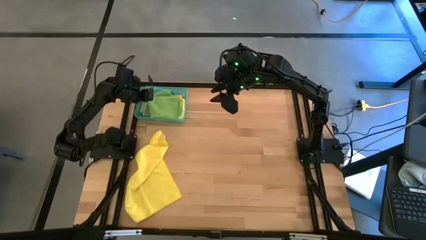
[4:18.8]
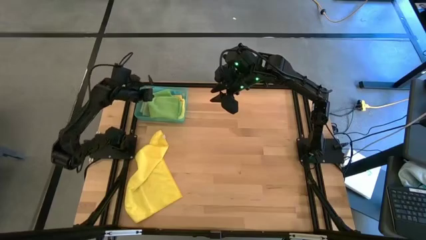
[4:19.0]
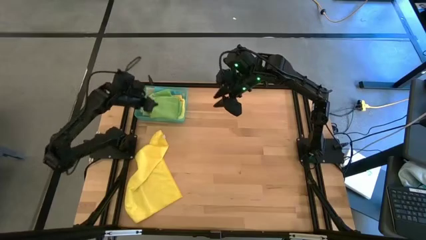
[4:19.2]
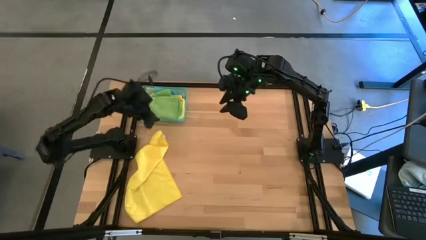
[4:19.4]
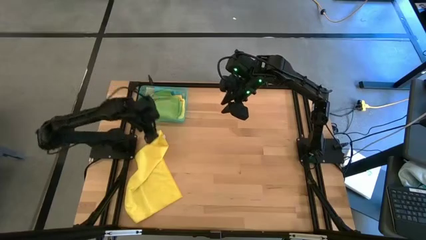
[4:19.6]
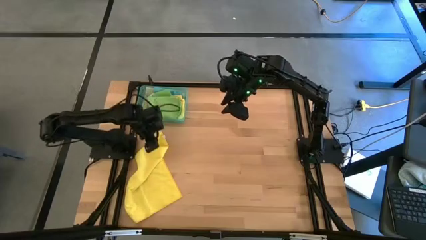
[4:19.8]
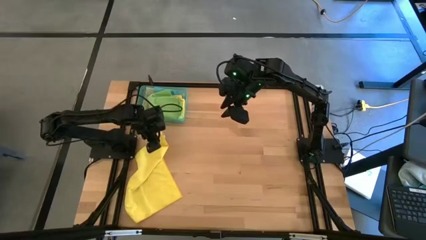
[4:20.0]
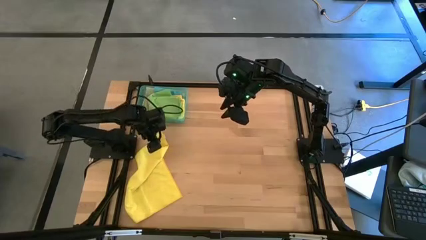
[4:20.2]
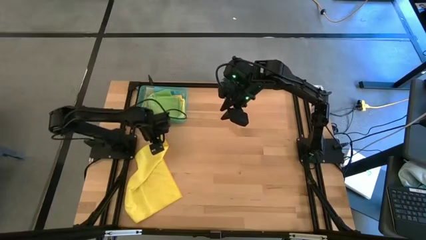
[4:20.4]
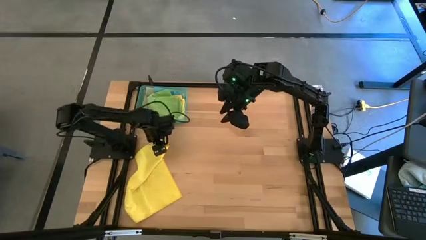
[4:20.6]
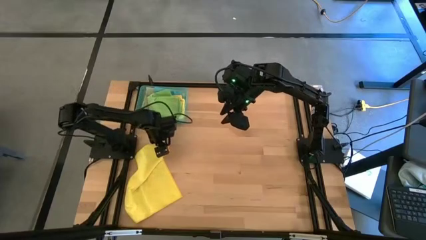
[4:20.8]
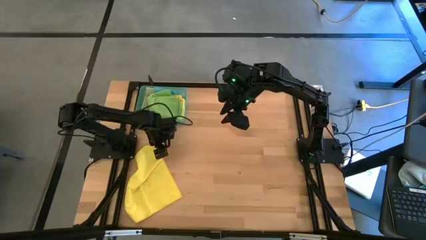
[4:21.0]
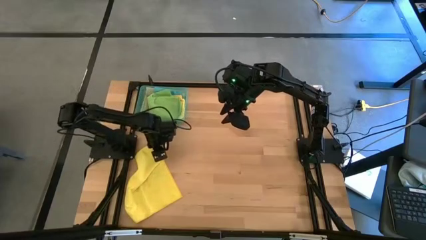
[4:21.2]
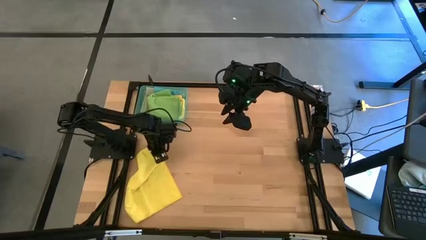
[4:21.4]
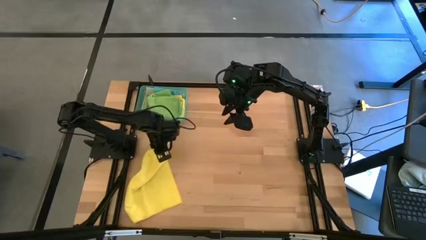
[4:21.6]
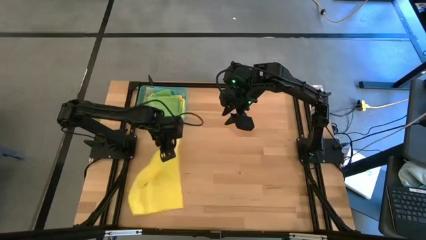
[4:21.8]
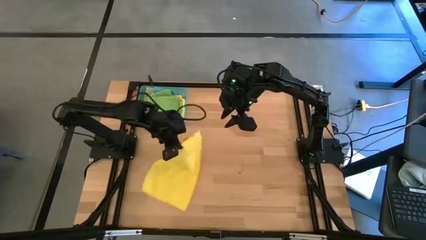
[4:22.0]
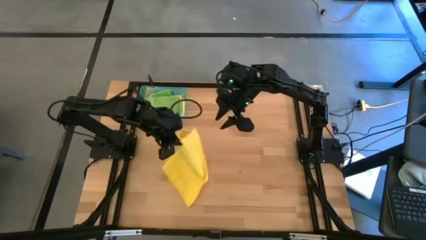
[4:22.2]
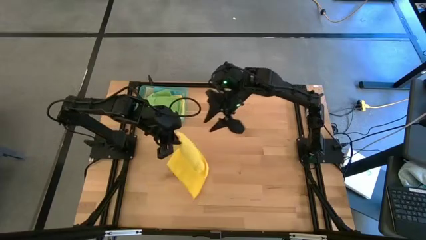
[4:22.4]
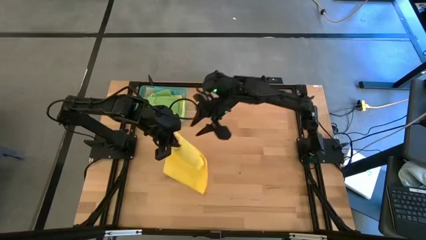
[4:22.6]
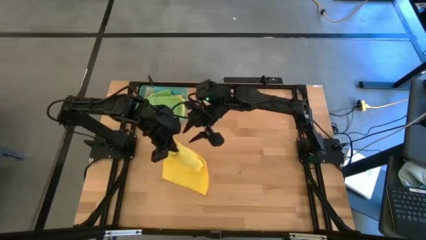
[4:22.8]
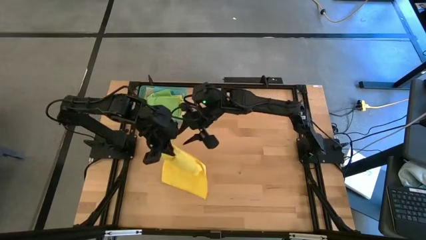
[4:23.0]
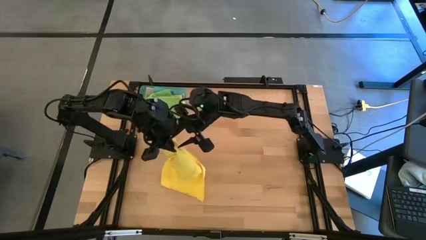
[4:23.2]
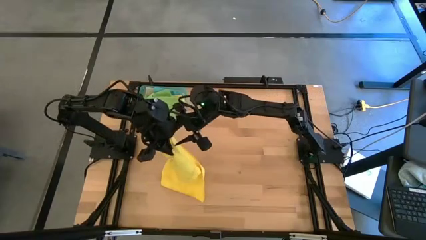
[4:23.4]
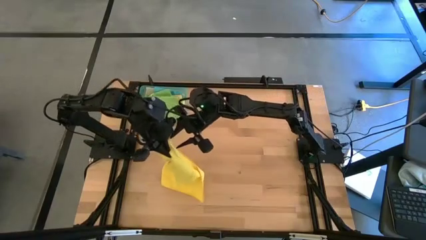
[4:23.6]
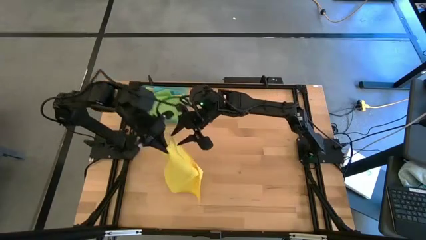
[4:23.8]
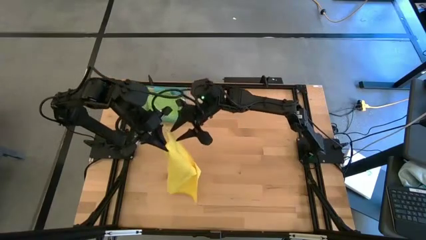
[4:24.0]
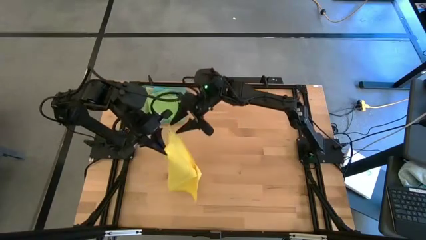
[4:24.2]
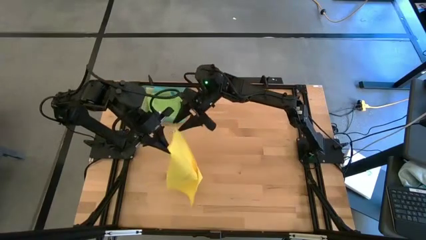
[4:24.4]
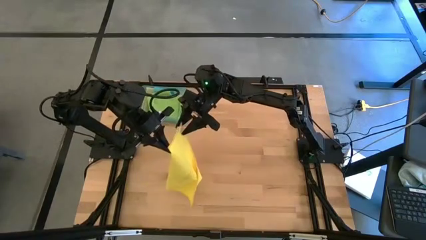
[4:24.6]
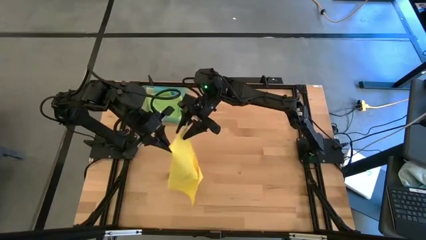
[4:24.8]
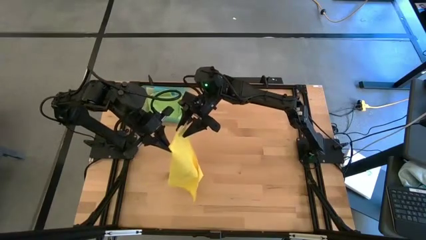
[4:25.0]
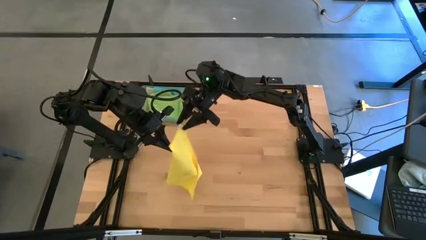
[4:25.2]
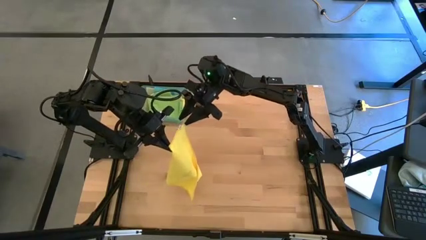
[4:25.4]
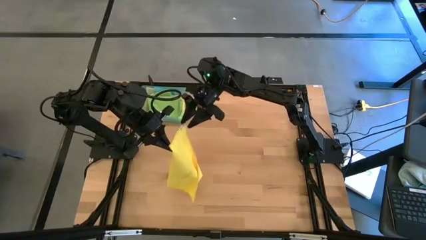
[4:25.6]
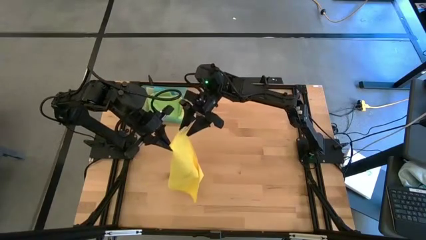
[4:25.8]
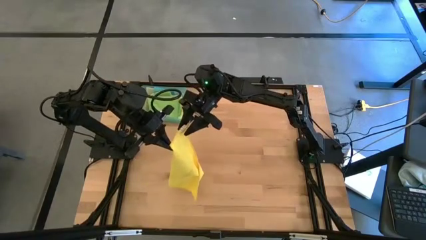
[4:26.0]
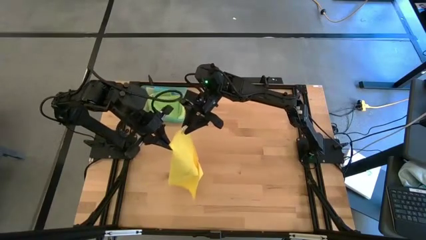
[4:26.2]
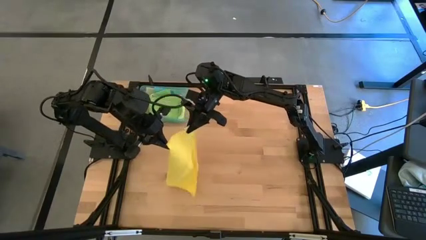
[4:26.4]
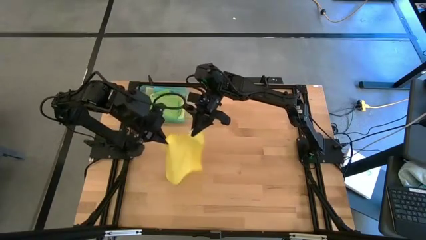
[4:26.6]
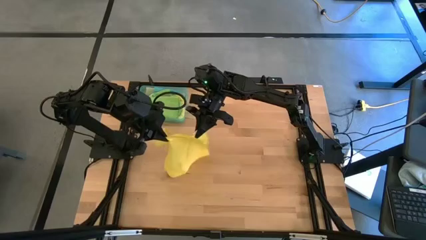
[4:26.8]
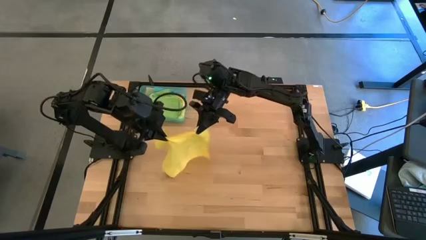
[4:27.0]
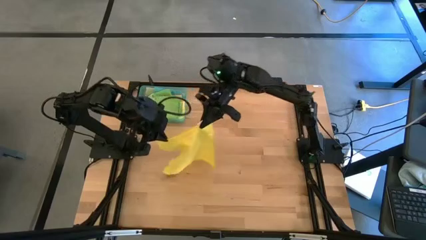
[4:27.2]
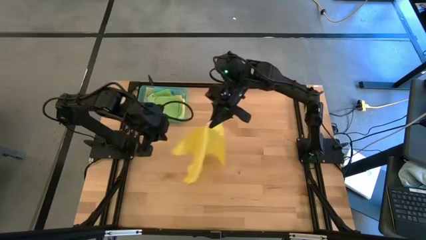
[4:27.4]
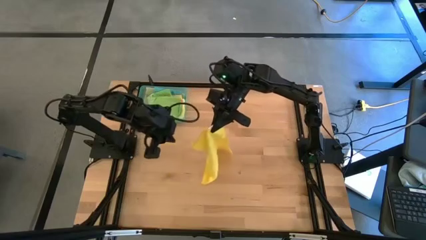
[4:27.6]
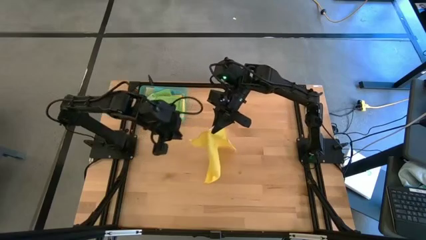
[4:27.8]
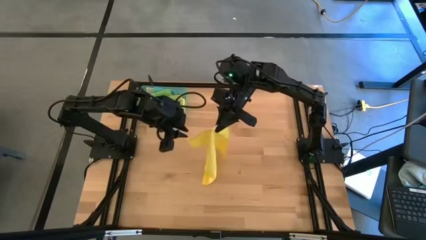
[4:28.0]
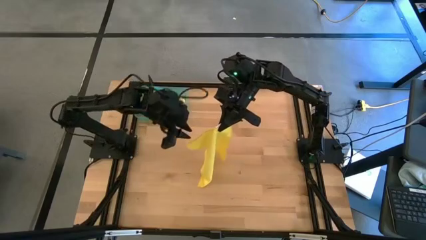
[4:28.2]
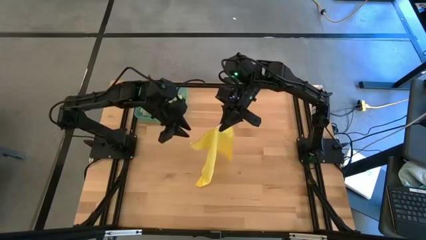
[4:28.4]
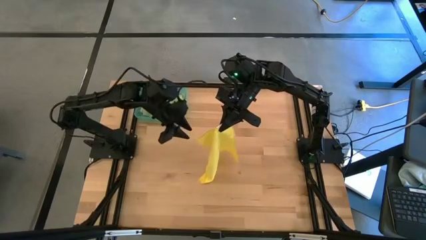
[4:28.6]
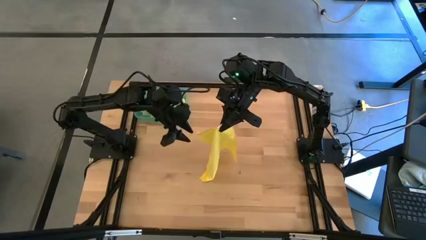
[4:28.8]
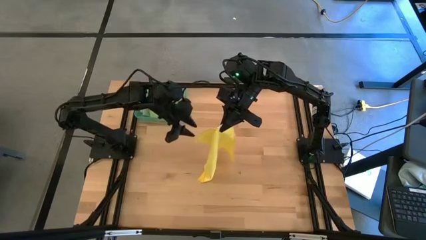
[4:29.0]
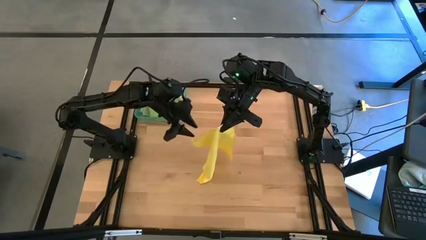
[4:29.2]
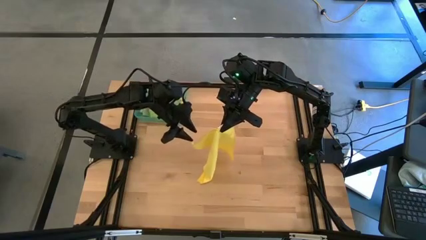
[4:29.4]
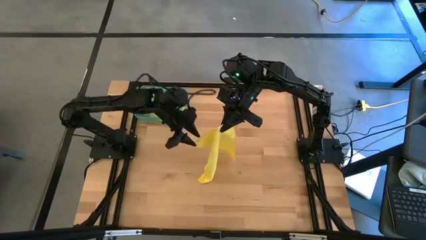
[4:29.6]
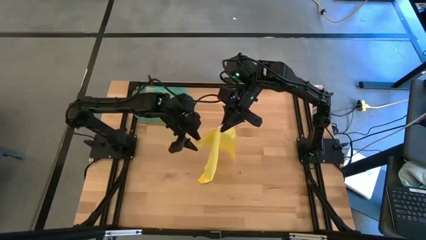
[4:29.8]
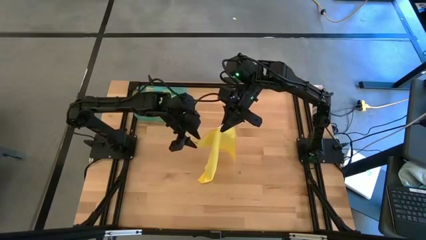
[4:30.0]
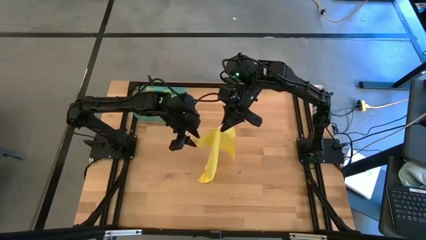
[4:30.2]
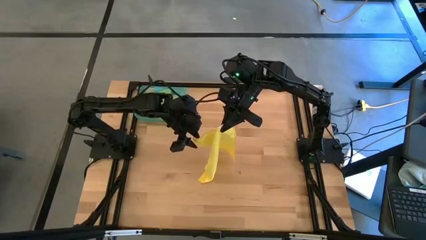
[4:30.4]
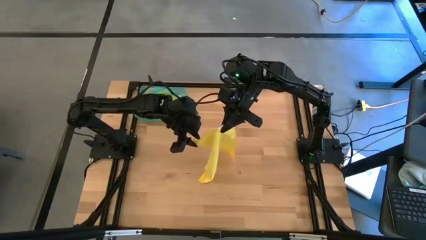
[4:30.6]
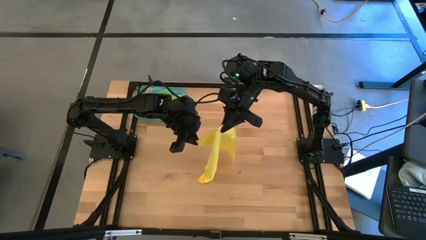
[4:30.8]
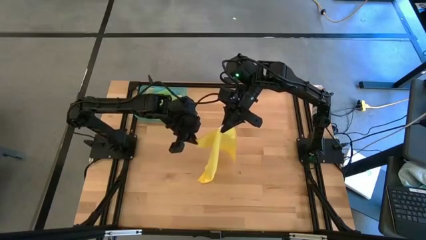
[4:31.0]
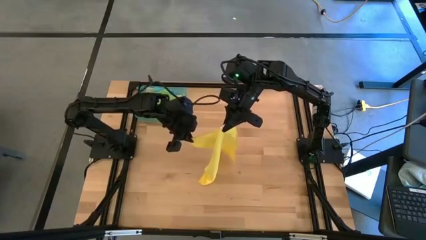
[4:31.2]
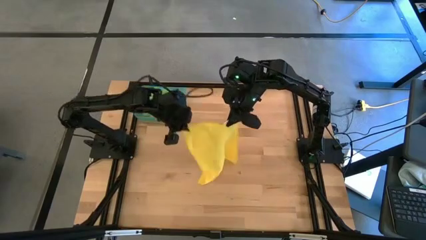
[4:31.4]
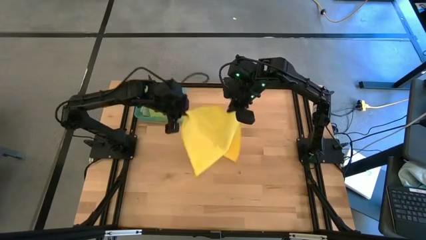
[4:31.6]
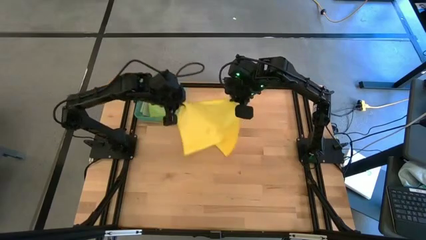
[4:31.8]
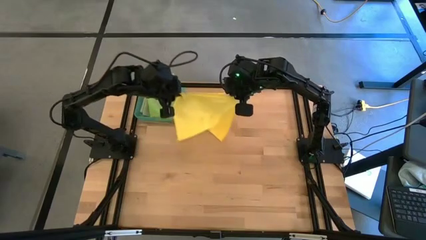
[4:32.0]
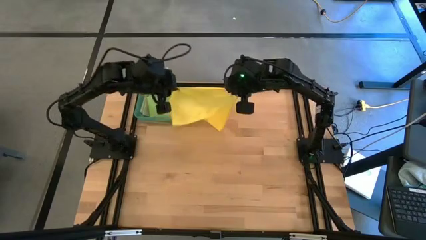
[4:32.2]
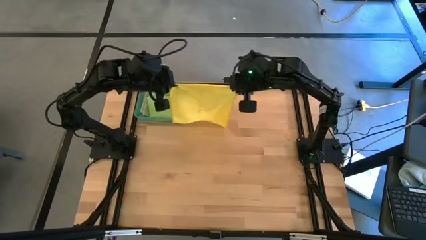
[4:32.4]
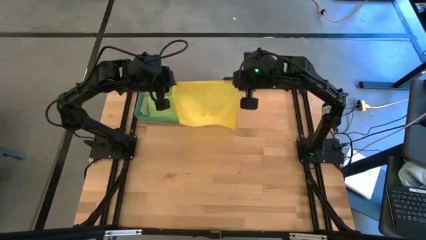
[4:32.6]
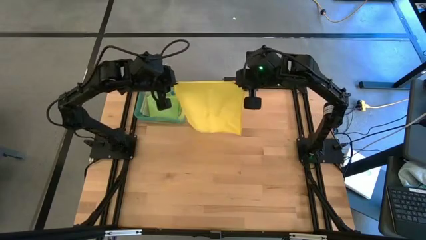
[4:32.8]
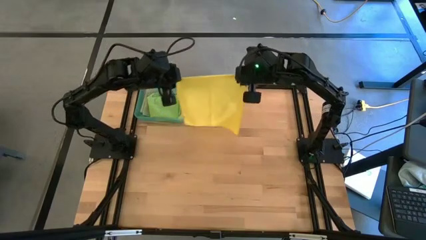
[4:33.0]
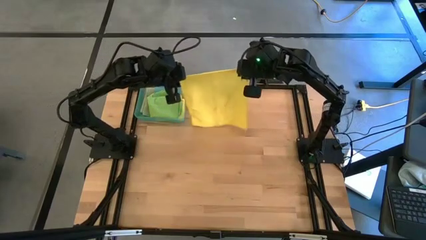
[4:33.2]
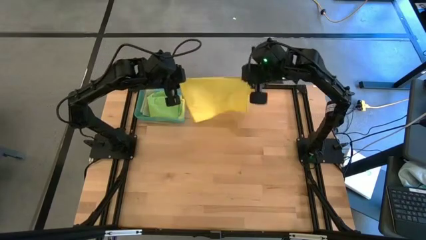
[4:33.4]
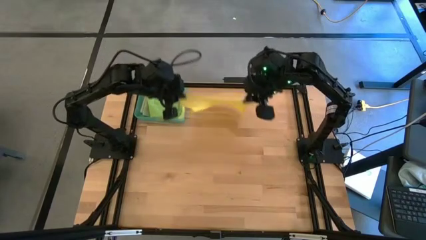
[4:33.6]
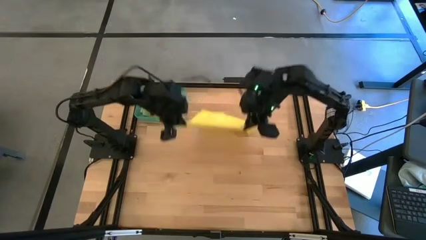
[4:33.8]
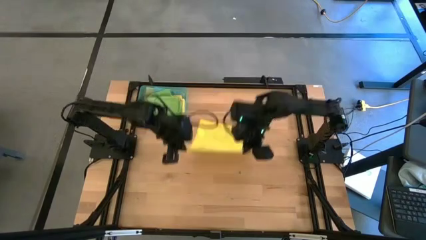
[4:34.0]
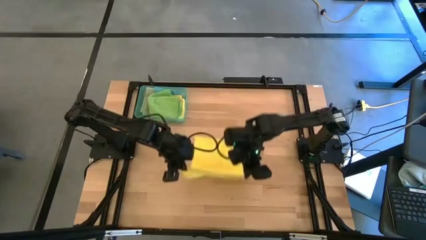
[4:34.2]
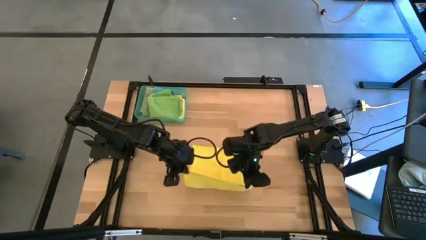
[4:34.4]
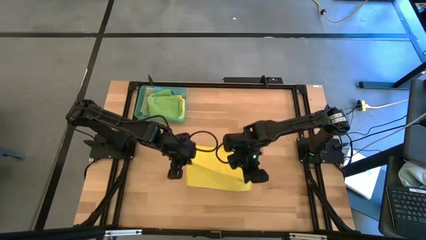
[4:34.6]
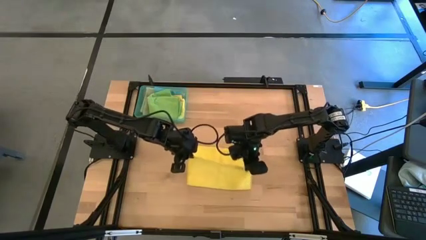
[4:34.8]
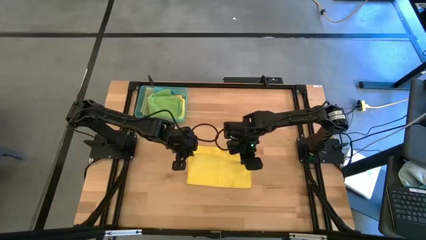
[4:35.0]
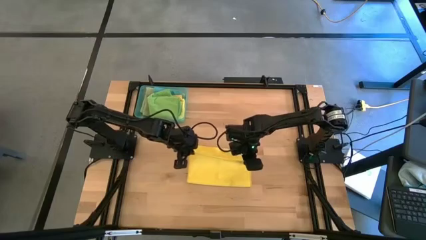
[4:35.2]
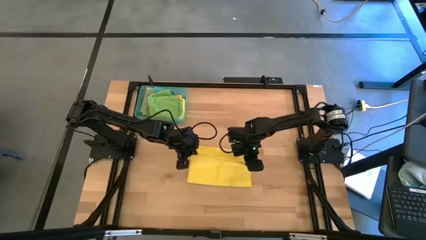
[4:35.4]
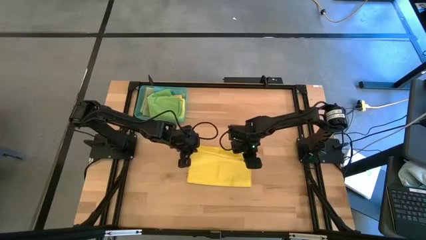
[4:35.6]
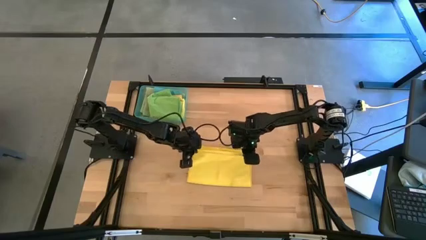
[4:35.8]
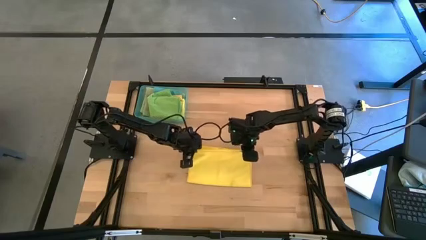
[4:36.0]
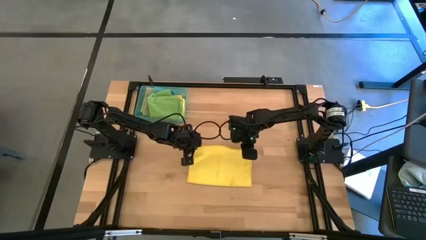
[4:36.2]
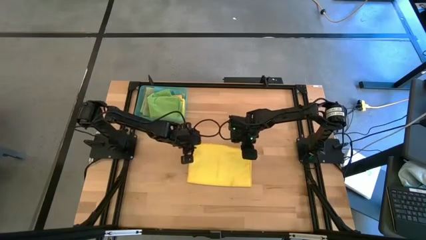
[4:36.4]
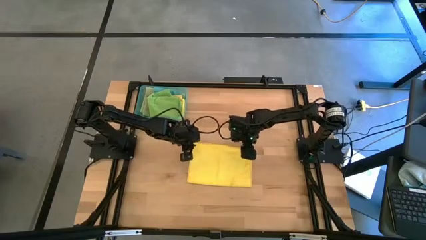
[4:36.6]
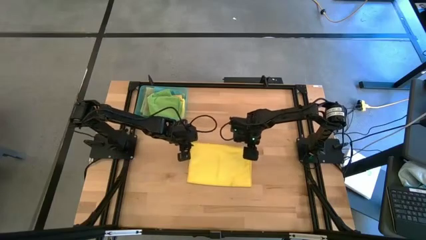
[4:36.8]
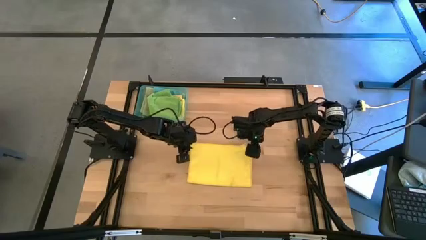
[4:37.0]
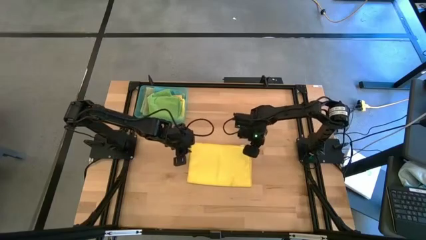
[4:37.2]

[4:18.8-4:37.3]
Task: Fold microfiber towels
Fold the yellow microfiber cloth
